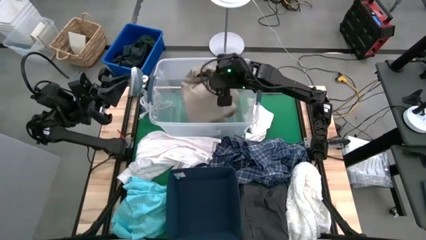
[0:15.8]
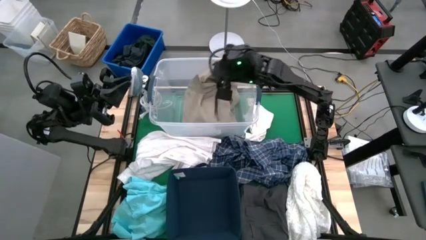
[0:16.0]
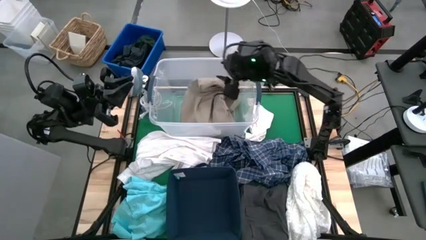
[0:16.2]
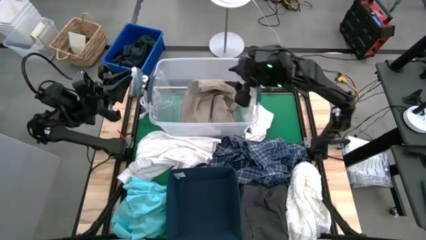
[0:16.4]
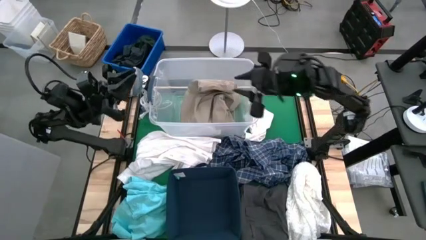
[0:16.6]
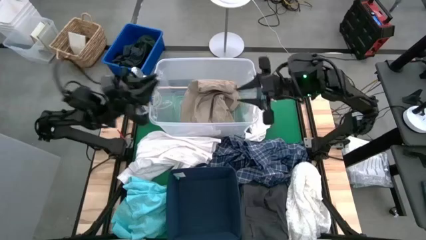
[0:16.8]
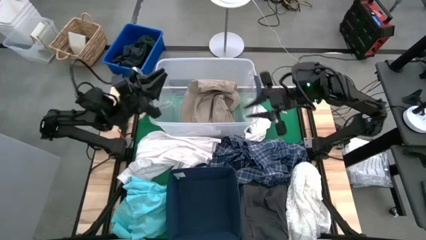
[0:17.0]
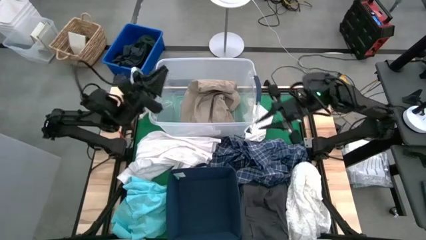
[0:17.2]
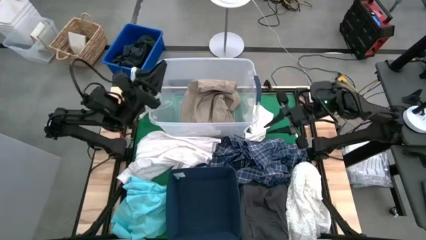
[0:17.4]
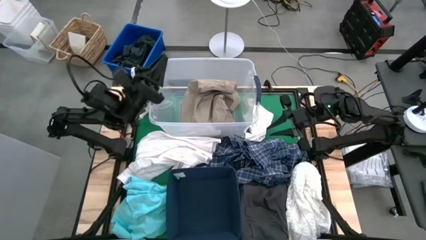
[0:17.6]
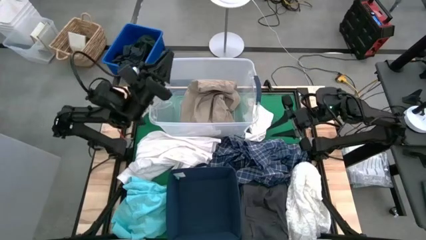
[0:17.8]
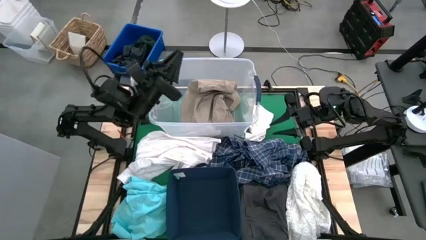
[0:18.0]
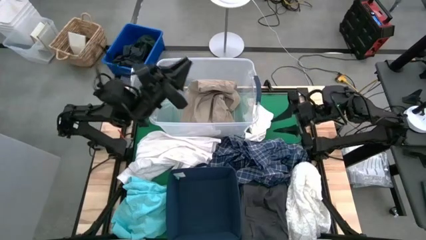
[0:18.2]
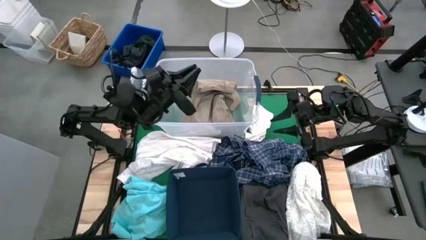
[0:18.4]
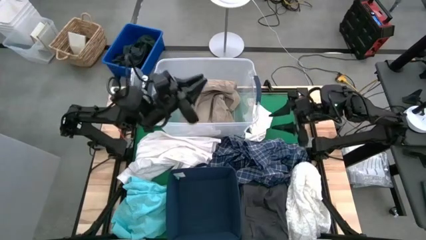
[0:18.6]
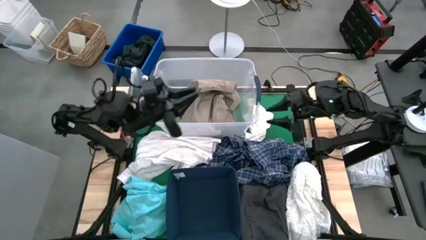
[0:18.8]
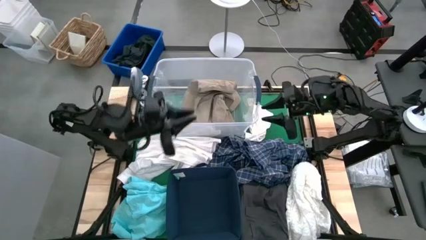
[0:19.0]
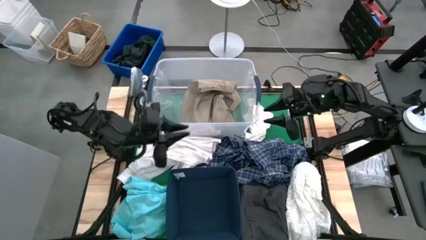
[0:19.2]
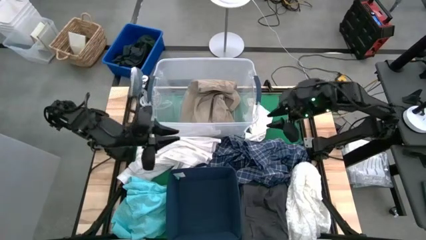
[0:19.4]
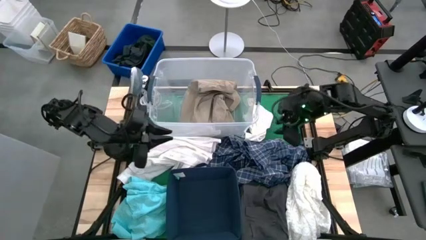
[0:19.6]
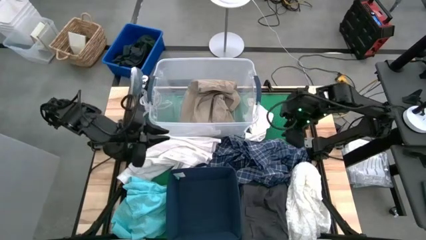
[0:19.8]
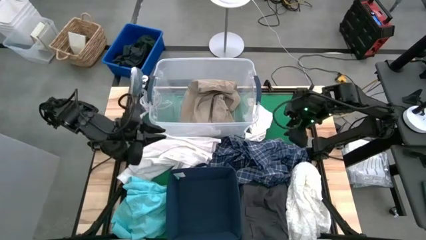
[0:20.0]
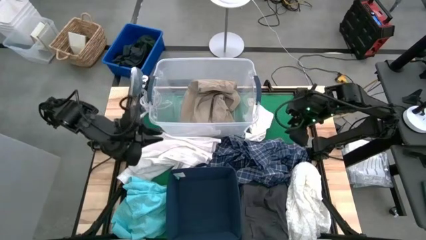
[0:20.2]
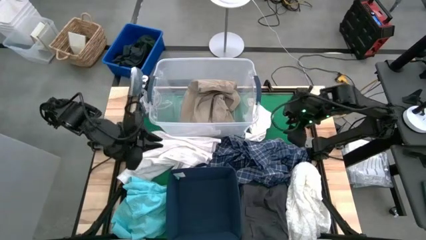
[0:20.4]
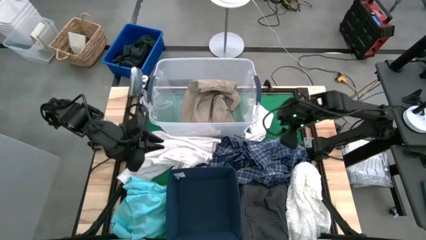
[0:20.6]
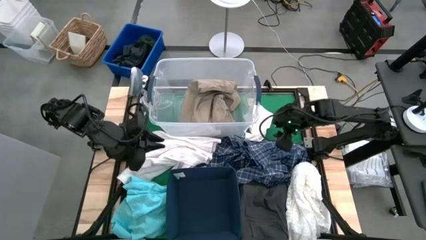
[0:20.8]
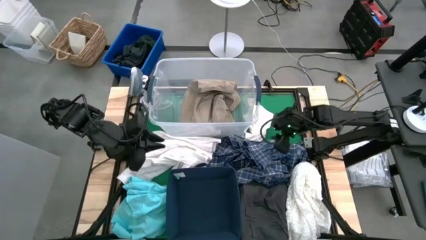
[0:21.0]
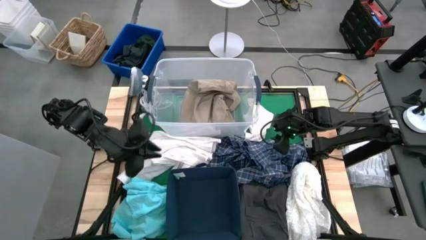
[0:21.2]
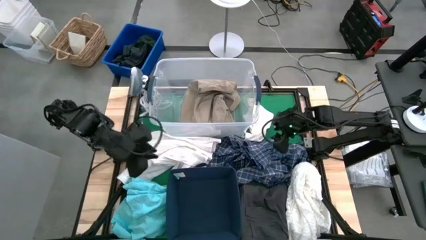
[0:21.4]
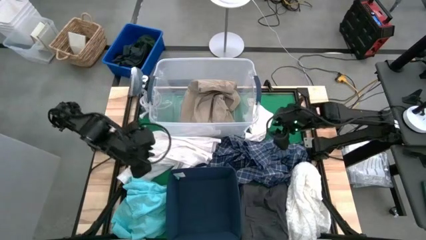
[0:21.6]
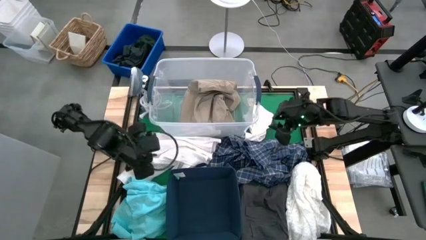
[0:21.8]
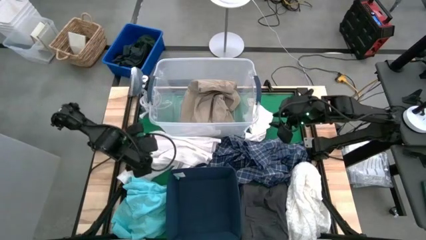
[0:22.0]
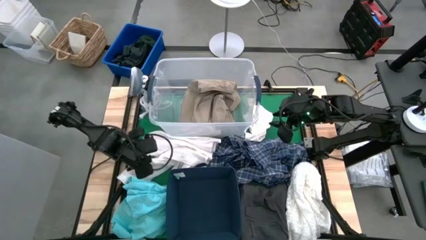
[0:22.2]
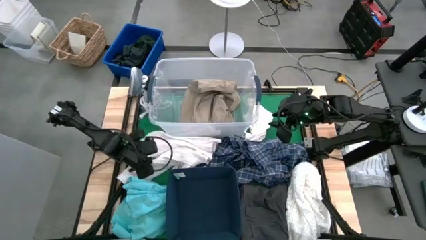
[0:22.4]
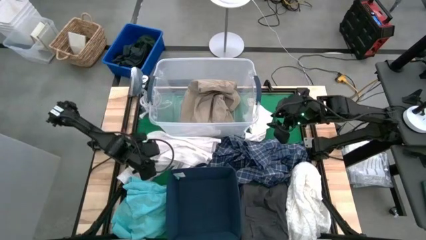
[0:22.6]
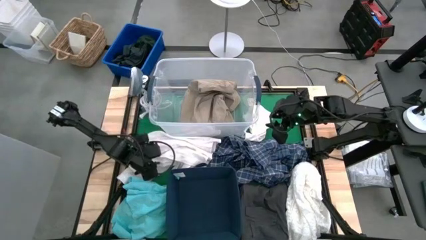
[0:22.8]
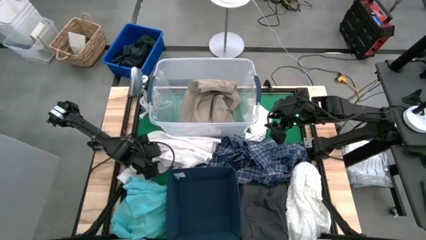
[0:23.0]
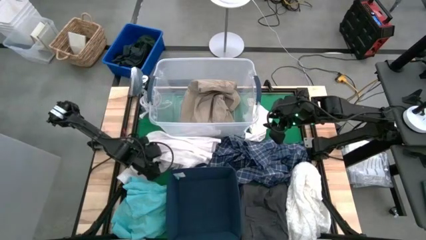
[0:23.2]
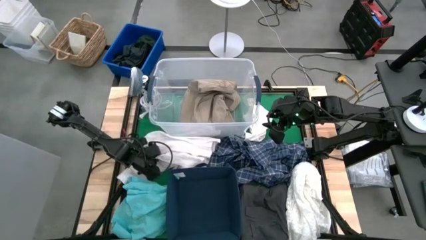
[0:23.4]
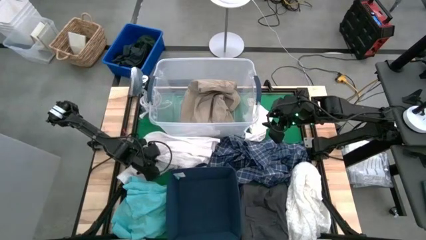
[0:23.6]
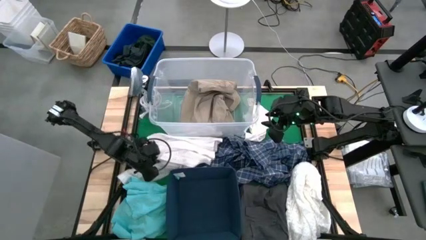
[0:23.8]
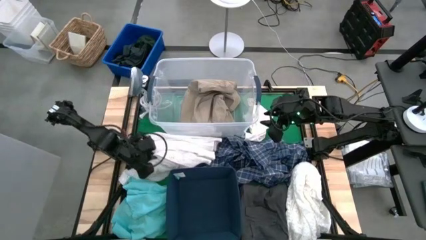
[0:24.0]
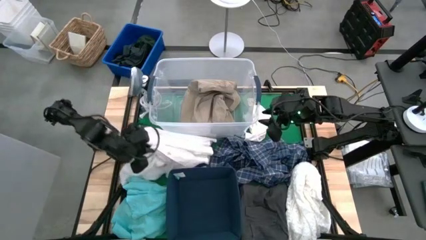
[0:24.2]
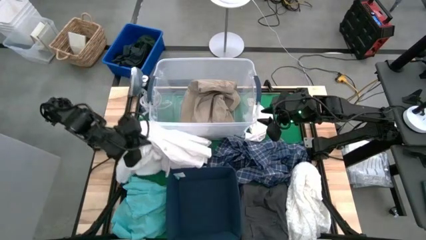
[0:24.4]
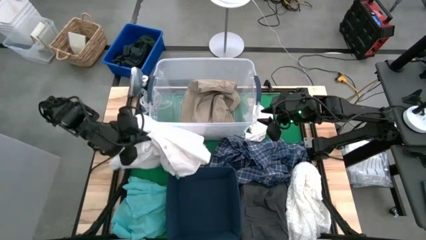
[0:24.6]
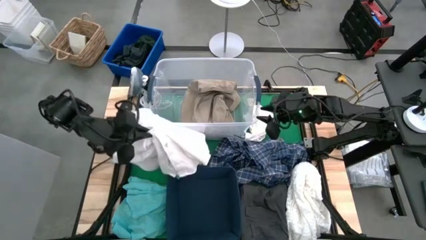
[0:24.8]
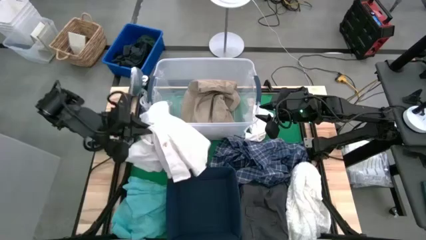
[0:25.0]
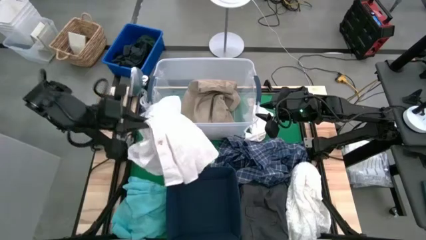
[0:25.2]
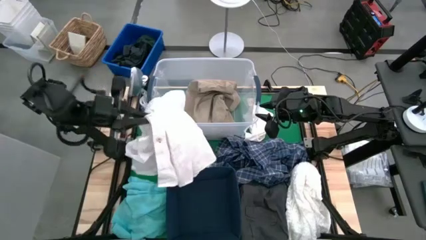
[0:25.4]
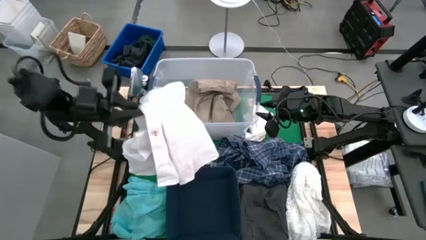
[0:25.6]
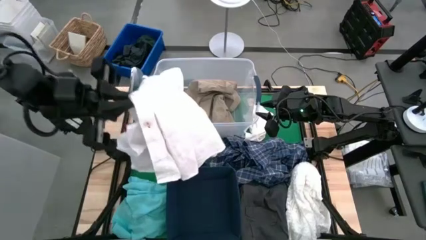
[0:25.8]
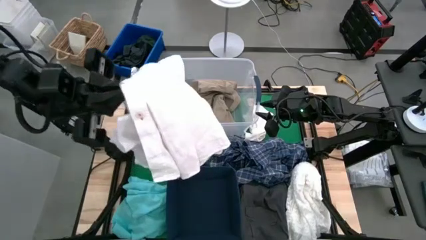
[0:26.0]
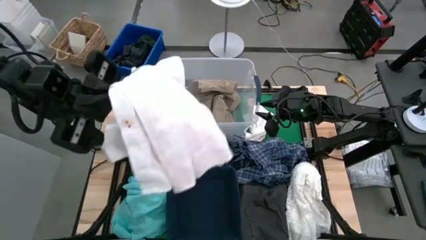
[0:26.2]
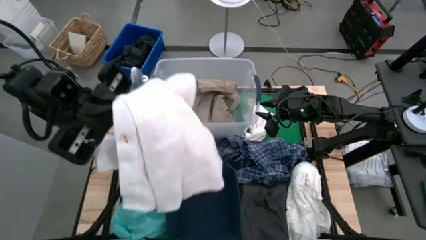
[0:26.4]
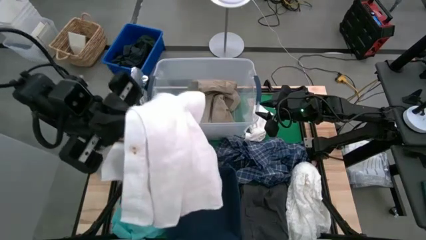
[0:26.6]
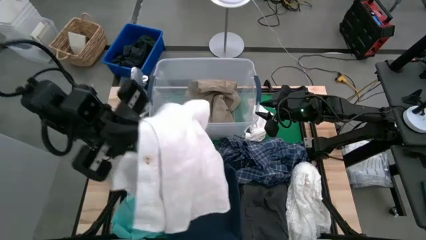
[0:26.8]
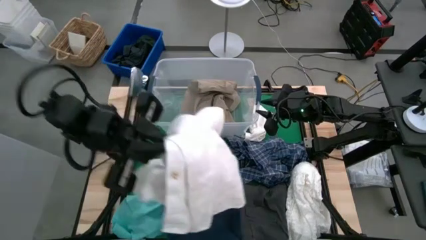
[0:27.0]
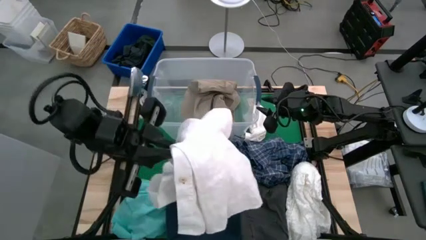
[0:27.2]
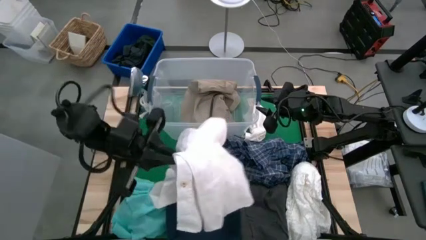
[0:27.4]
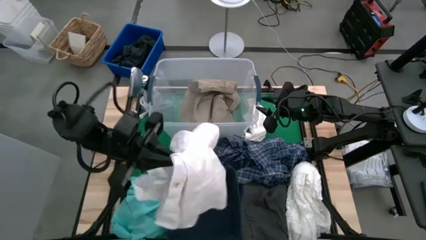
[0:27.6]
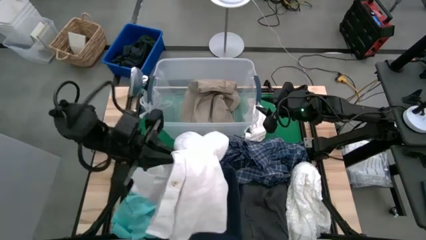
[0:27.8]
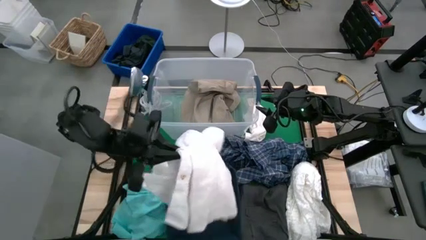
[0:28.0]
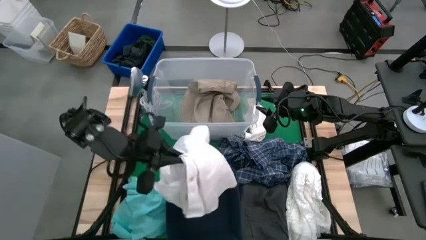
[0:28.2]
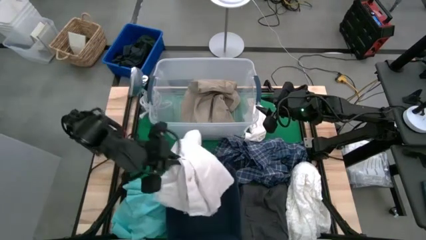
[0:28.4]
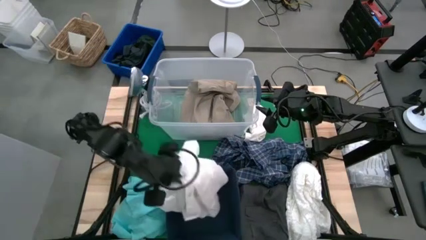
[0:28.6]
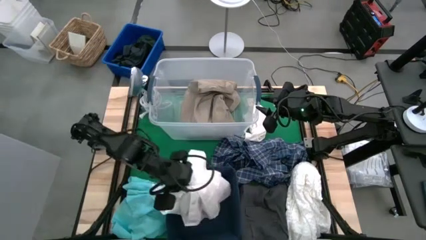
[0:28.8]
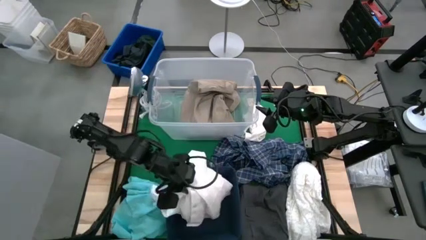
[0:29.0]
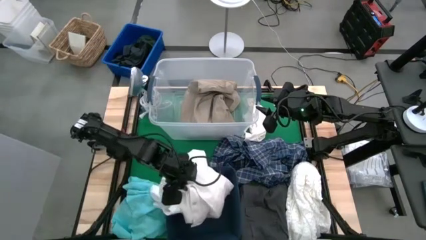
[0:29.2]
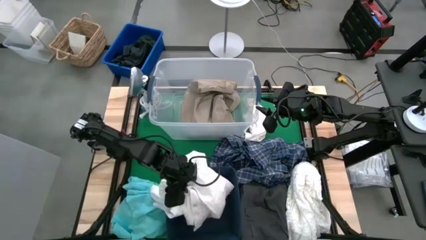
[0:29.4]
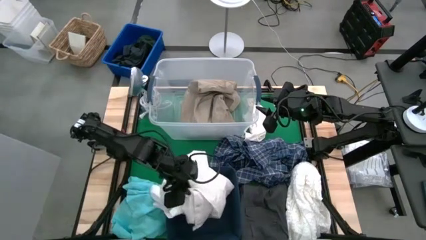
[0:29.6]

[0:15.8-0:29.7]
Task: Sort clothes
Put the white polo shirt into the blue laundry bin

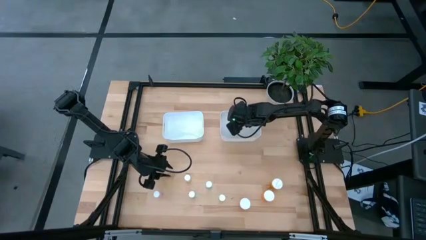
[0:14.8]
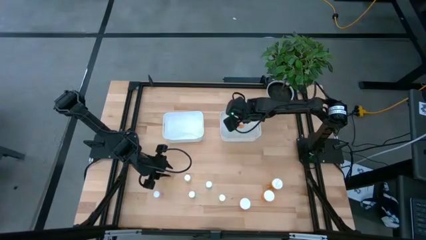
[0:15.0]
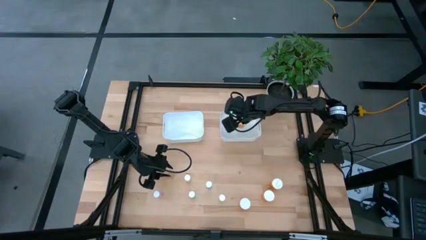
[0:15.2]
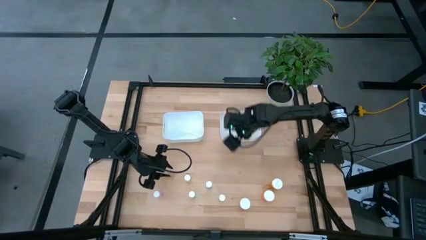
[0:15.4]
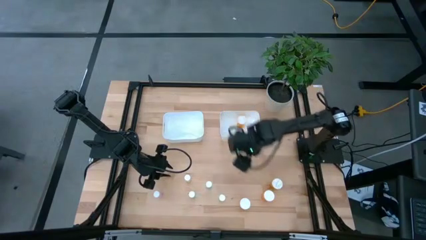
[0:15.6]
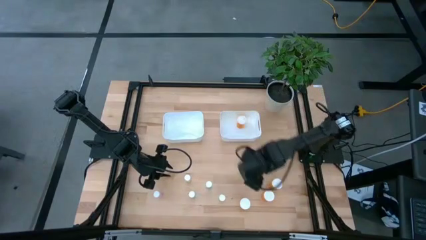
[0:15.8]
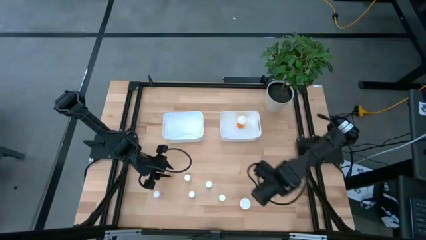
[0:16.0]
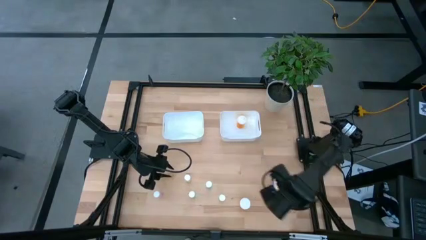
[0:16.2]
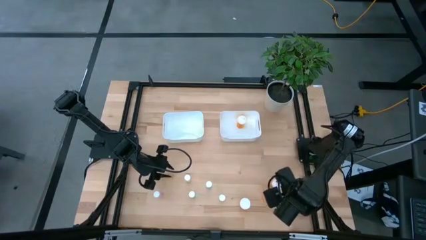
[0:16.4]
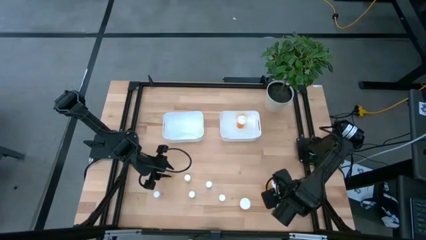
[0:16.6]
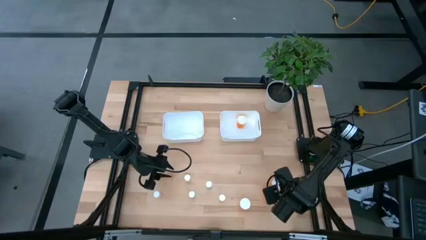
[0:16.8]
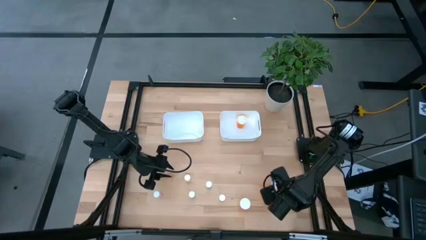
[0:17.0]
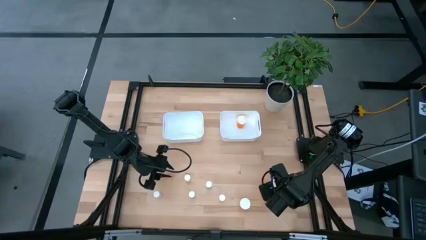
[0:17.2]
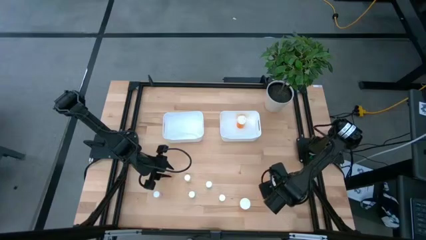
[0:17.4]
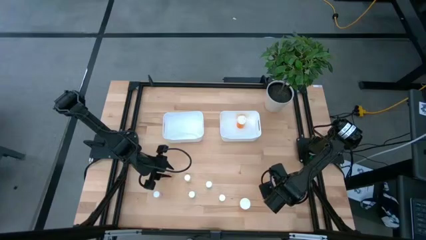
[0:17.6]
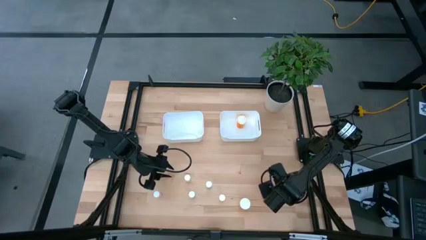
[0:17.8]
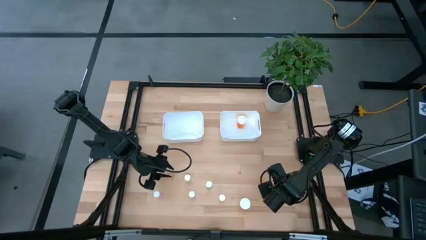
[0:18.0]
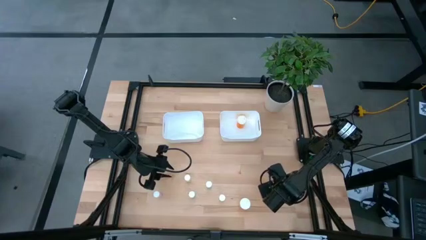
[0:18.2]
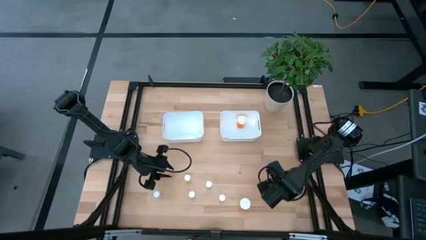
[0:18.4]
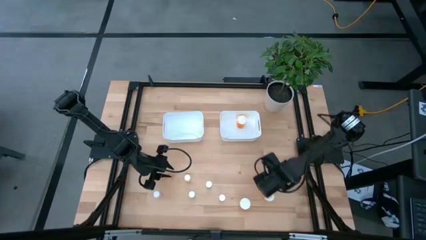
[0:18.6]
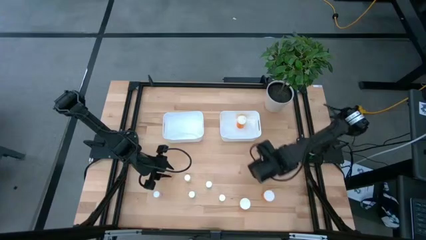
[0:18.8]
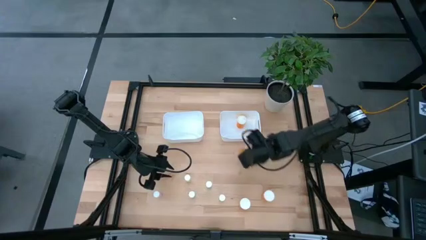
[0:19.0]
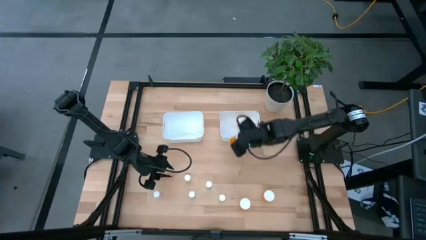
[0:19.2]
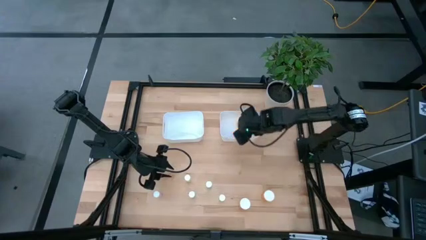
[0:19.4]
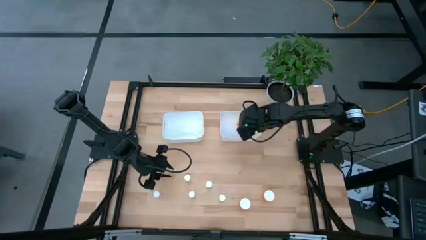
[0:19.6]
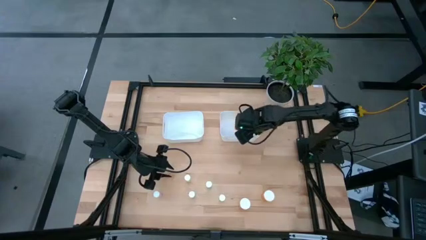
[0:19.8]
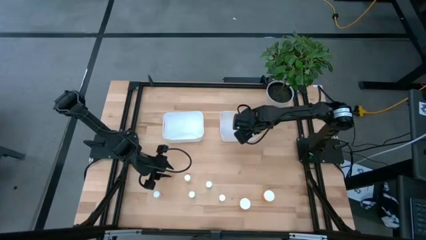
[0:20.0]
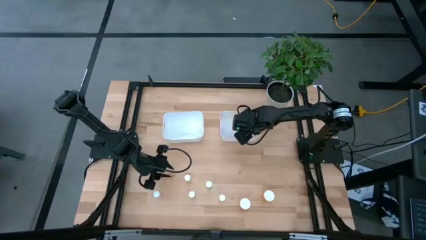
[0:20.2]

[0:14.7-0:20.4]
Task: Pick and place medicine bottles into bin by pill shape (circle, oval)
Put the right orange pill bottle into the right white bin
